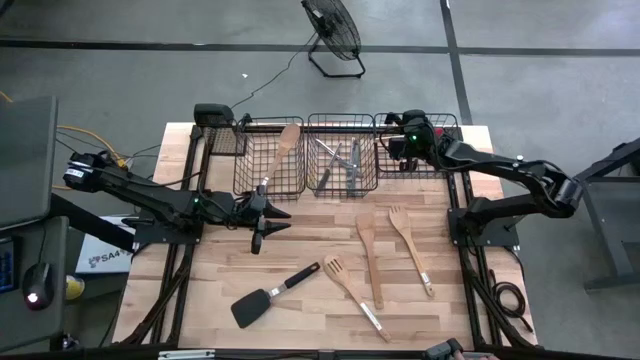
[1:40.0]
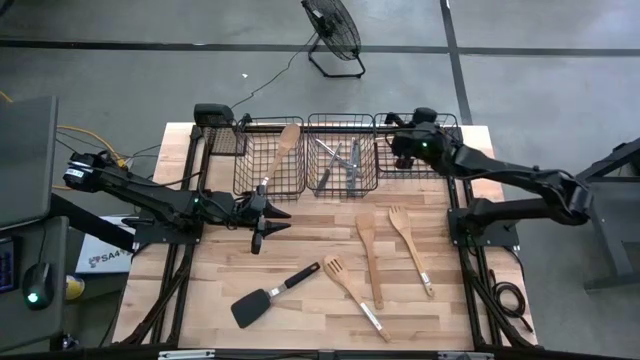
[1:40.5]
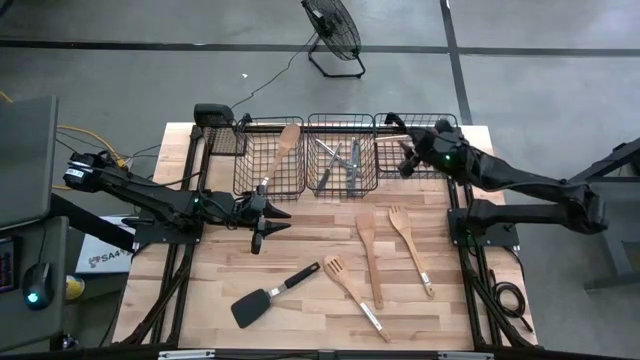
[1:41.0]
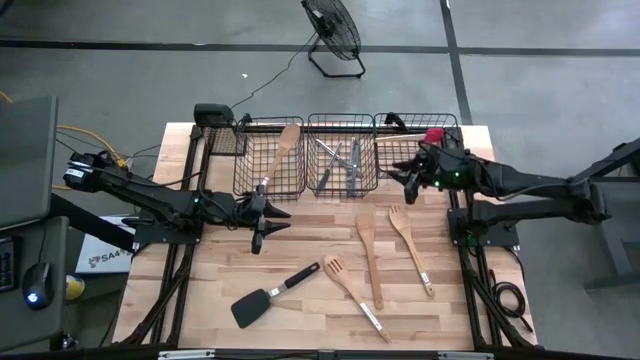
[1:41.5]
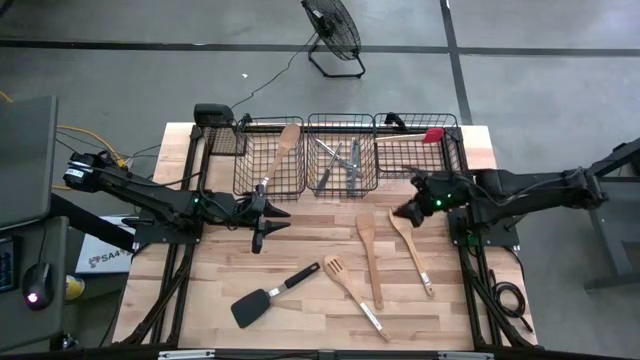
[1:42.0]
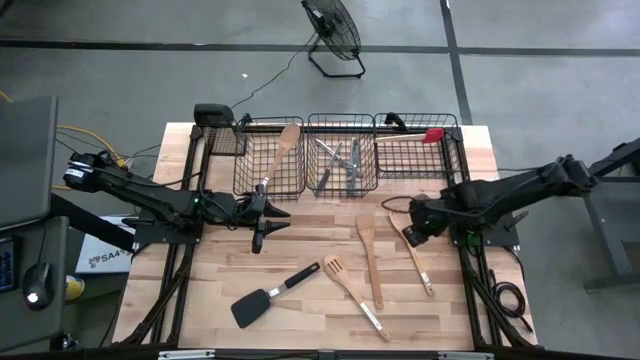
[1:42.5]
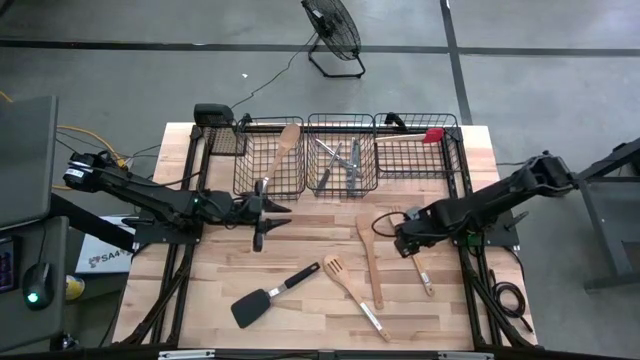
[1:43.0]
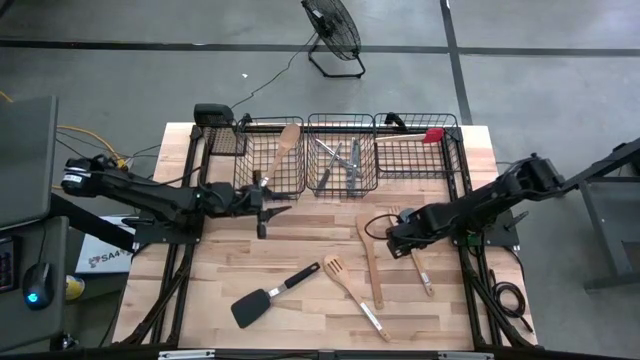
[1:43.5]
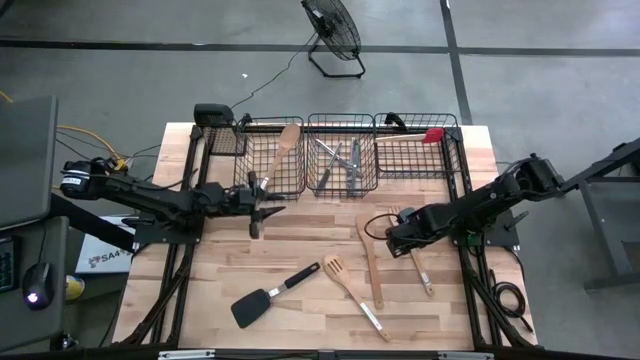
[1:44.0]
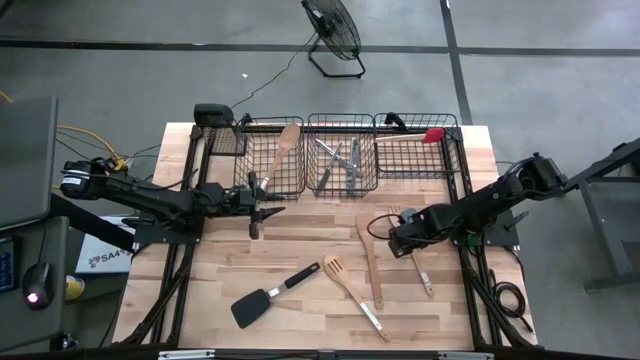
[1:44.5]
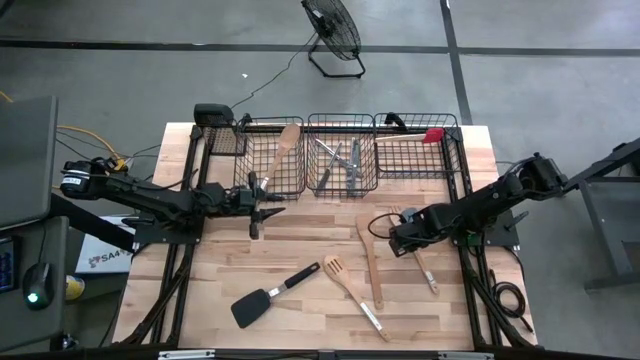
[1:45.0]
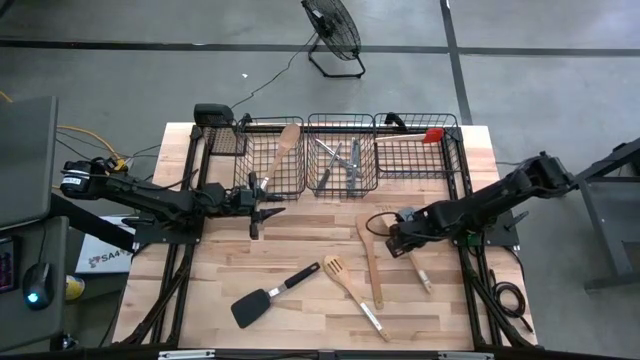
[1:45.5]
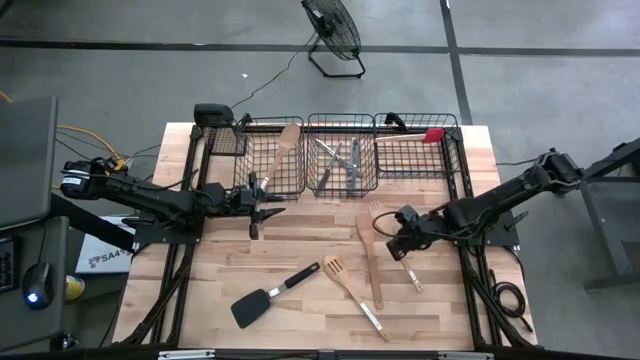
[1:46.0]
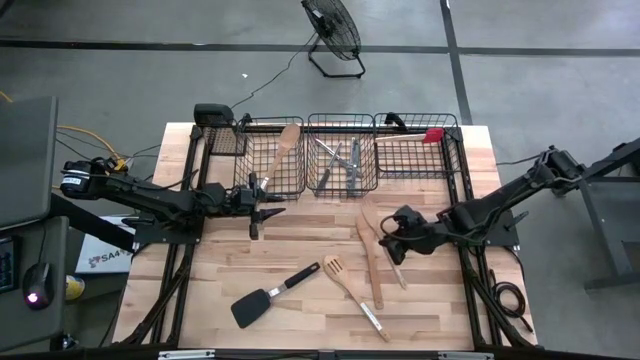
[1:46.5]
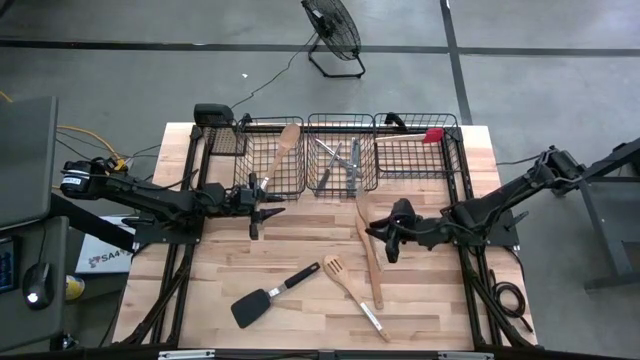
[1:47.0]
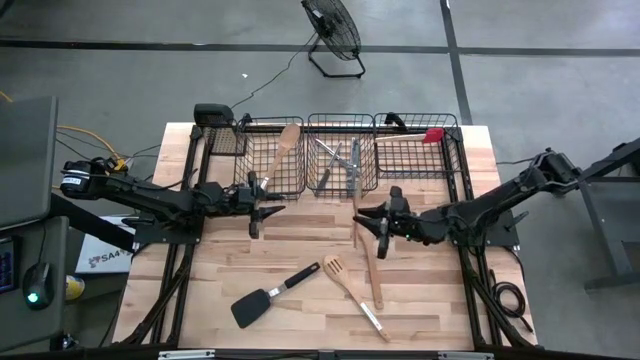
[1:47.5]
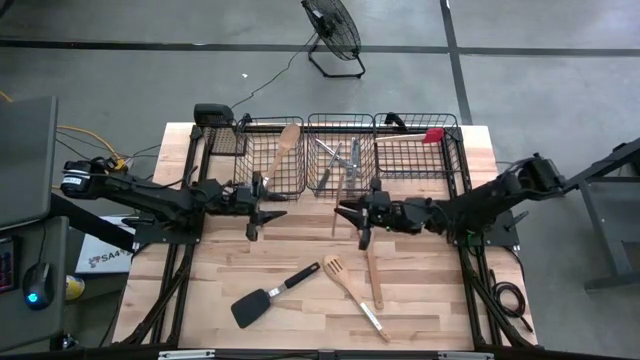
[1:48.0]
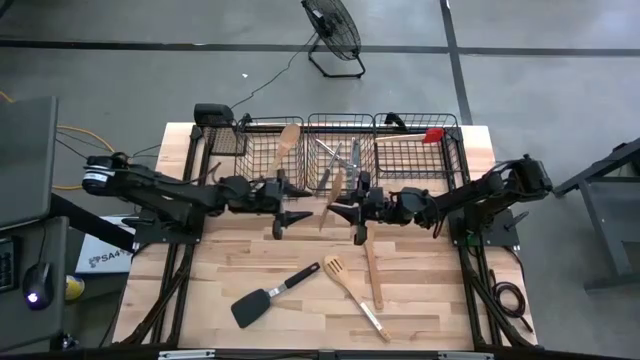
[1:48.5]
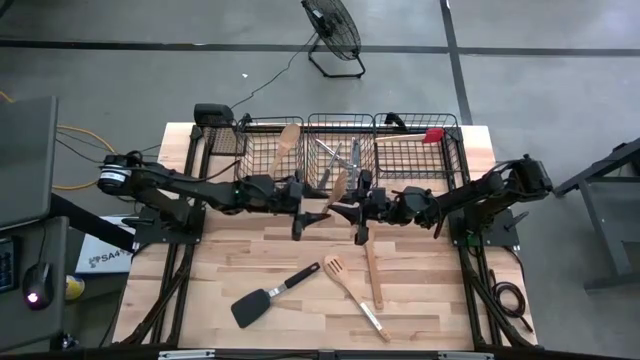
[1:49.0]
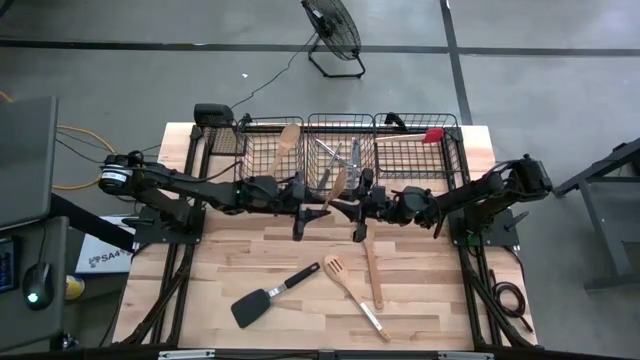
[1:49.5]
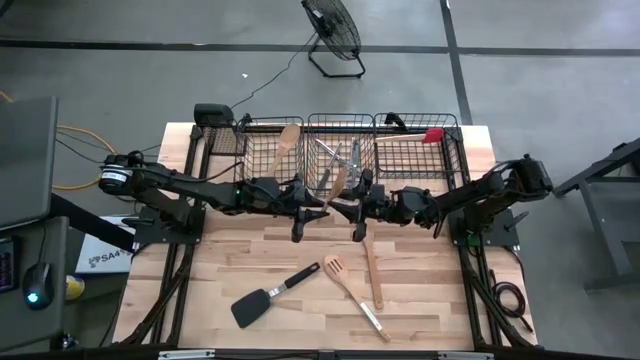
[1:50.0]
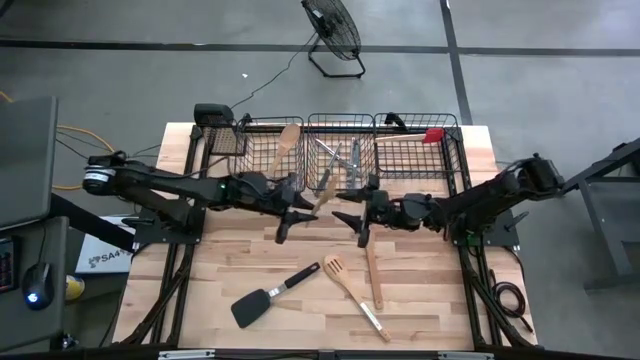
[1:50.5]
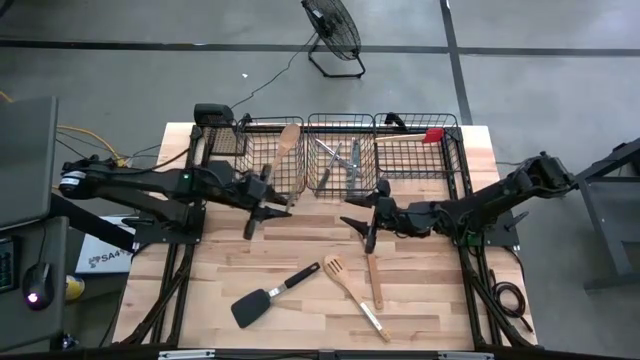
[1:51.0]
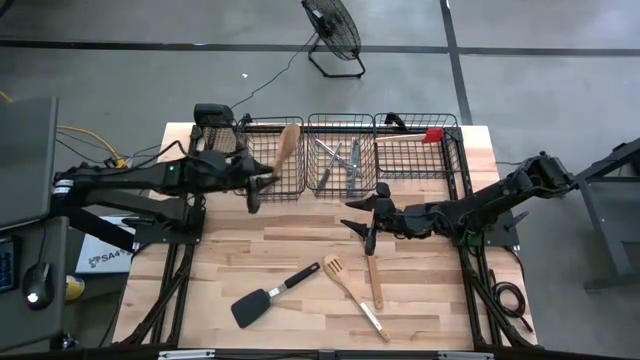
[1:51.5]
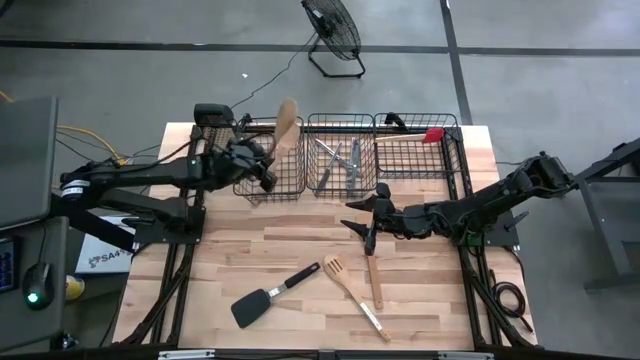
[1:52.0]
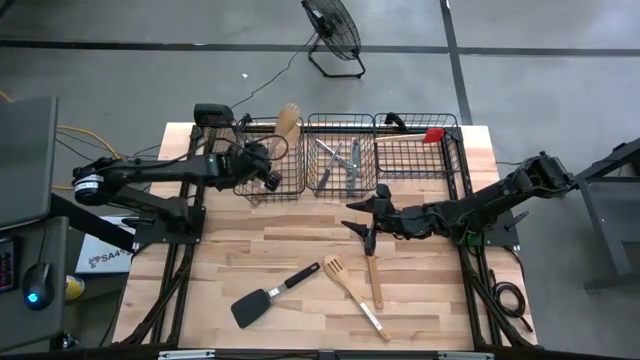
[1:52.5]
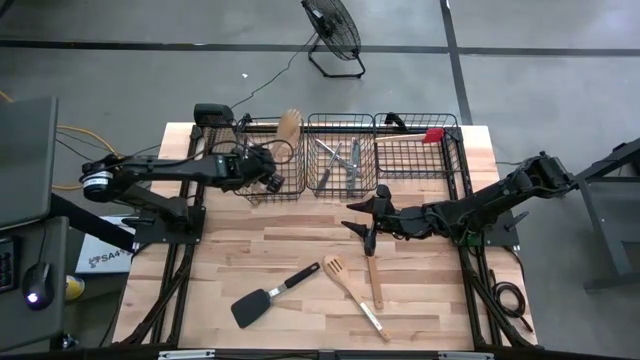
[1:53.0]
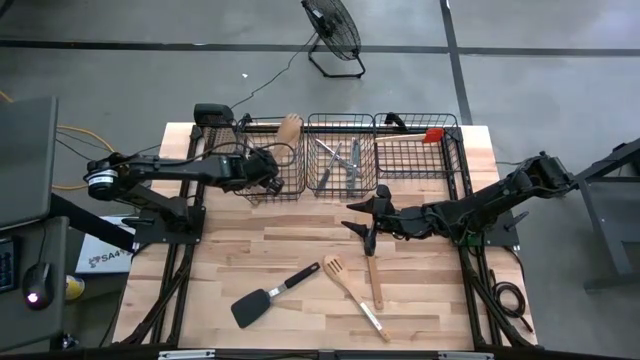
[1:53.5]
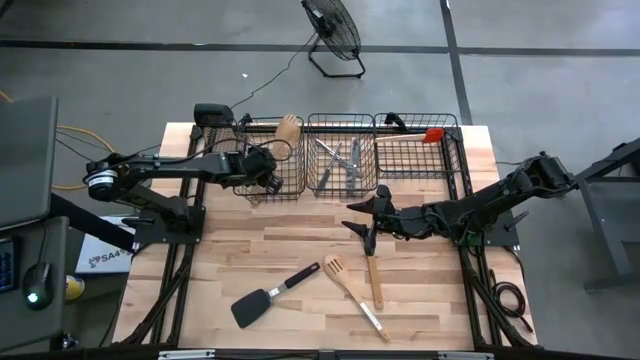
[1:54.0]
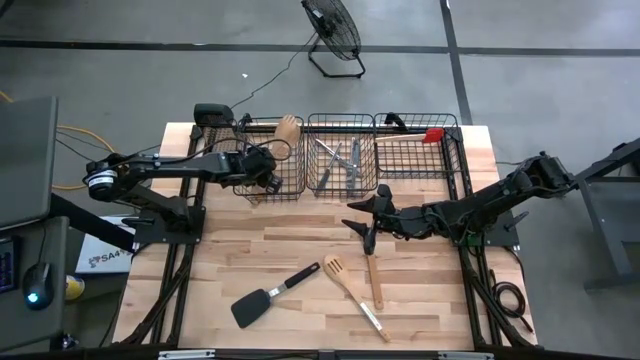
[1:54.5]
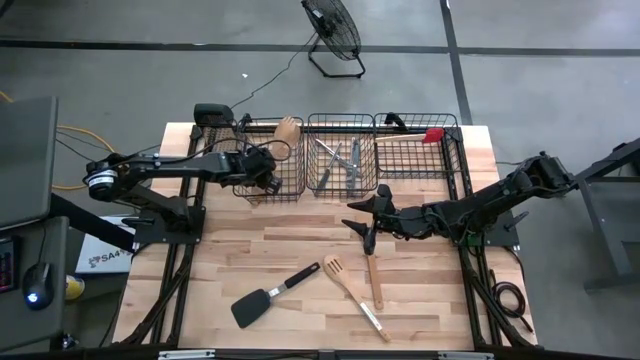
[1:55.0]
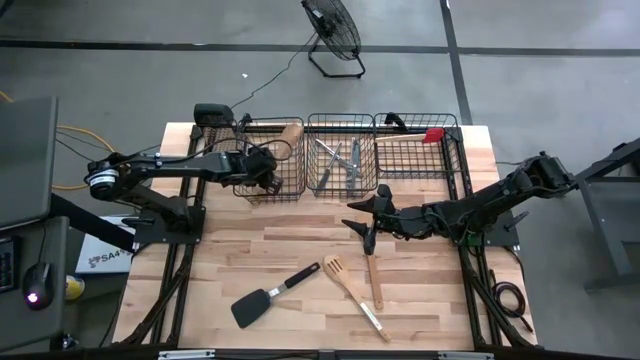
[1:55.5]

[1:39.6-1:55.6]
Task: Pick & Place Kitchen Items
Put the wooden serving spoon into the left wire basket
